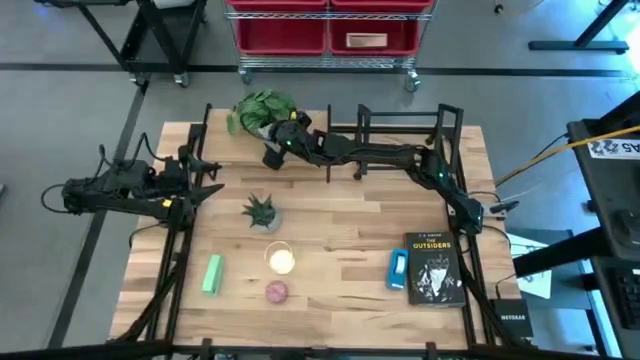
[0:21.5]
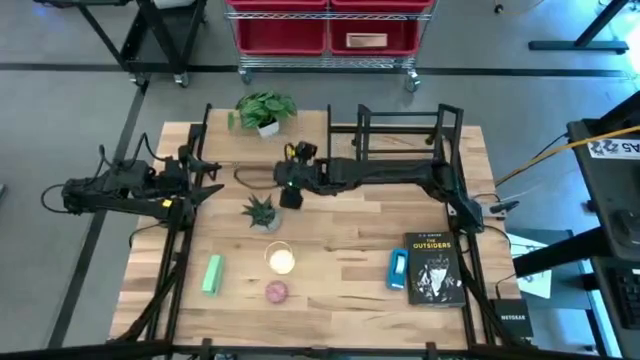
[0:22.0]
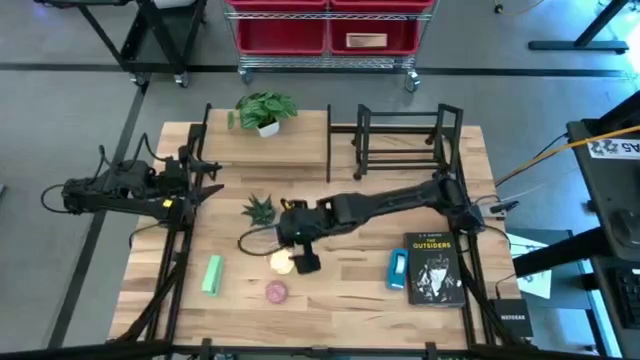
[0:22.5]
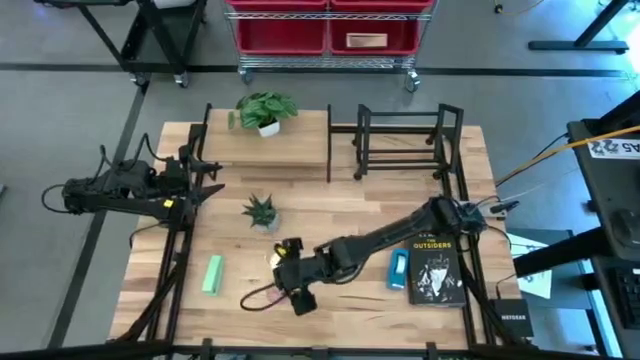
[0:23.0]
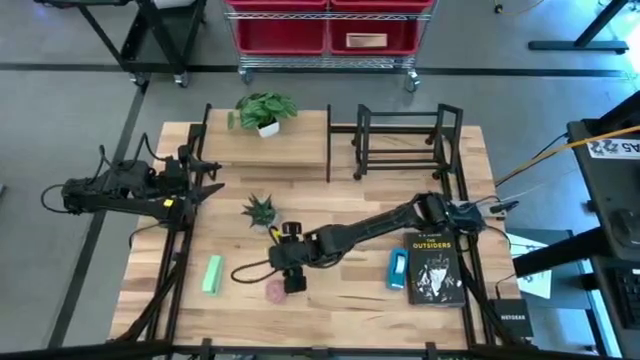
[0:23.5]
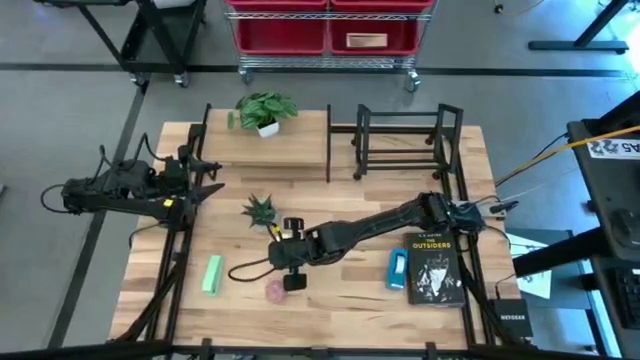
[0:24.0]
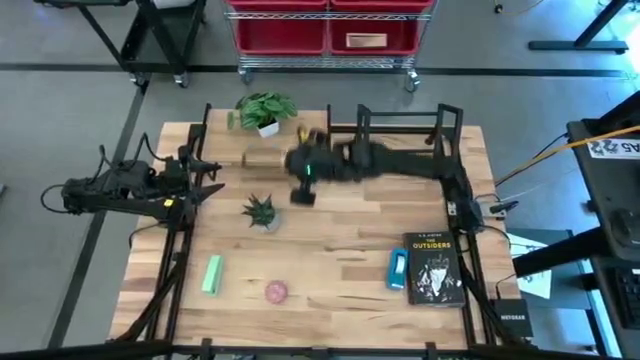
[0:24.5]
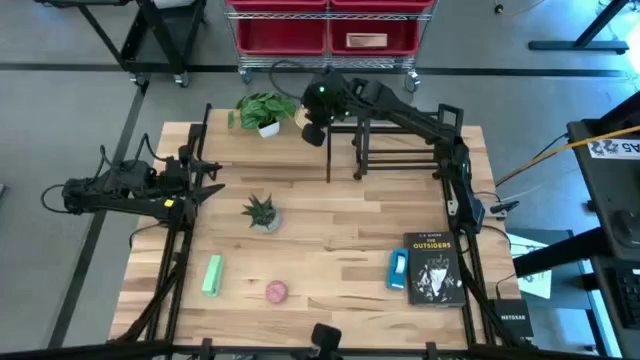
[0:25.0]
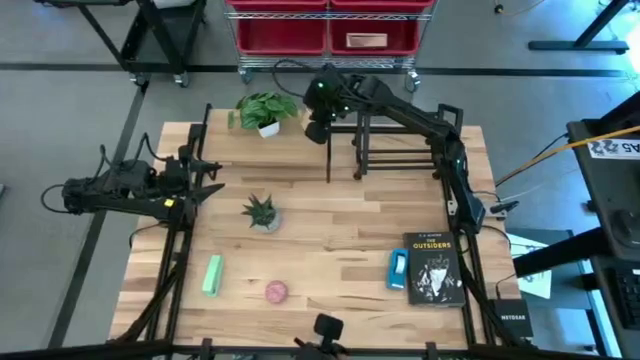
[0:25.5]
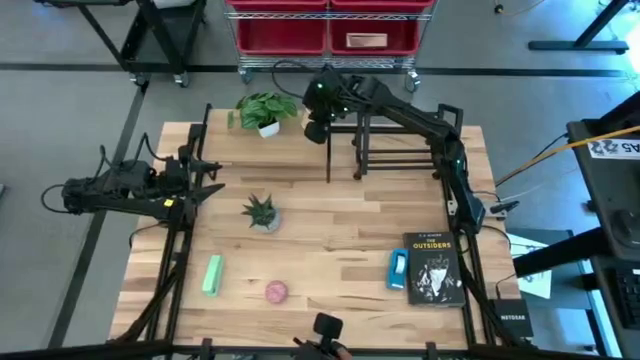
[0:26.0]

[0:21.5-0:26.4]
Task: Stock shelves
Put the gold pen holder on the shelf

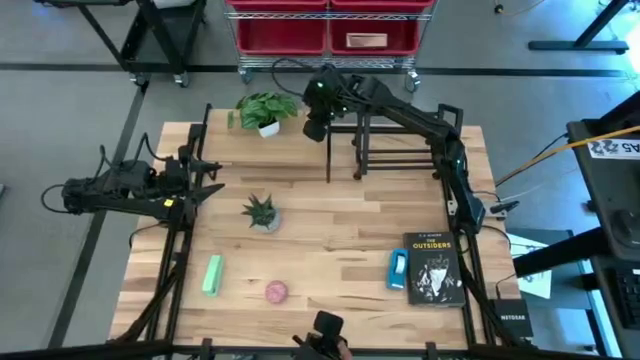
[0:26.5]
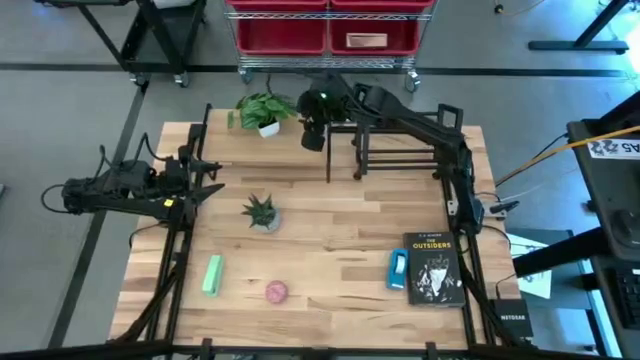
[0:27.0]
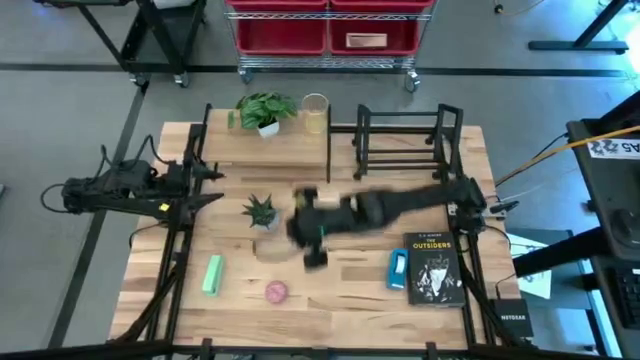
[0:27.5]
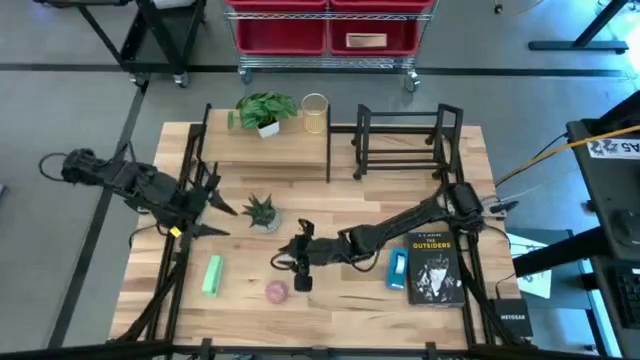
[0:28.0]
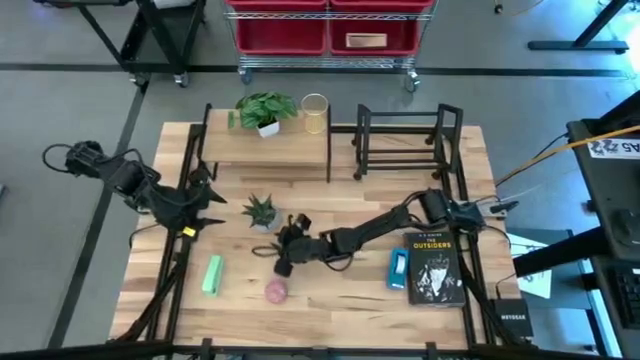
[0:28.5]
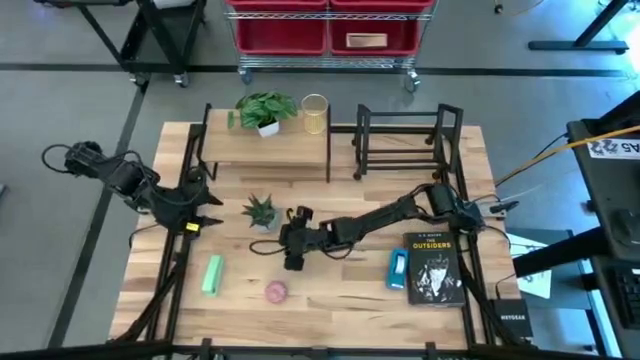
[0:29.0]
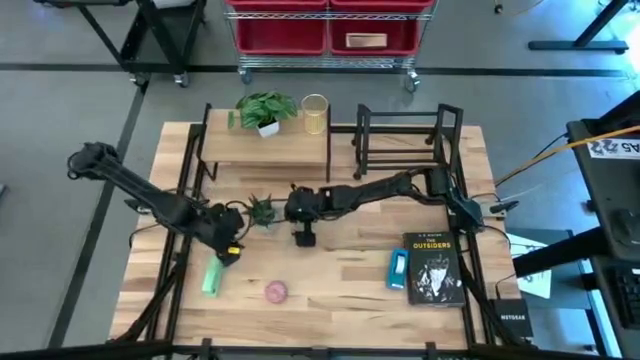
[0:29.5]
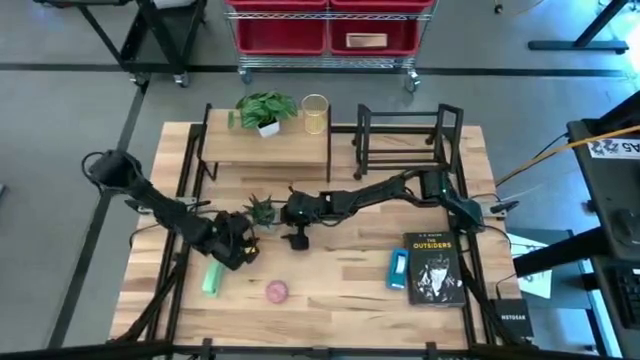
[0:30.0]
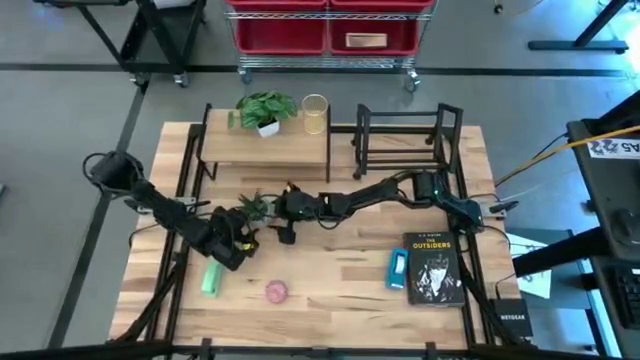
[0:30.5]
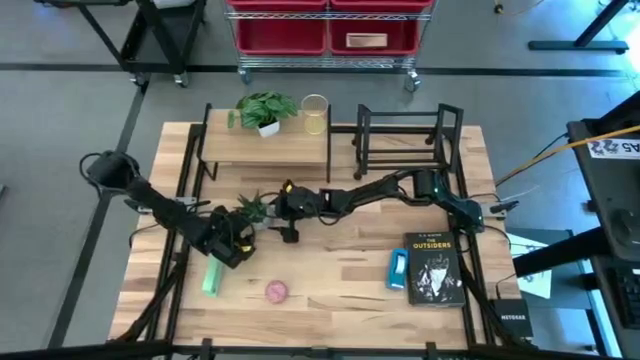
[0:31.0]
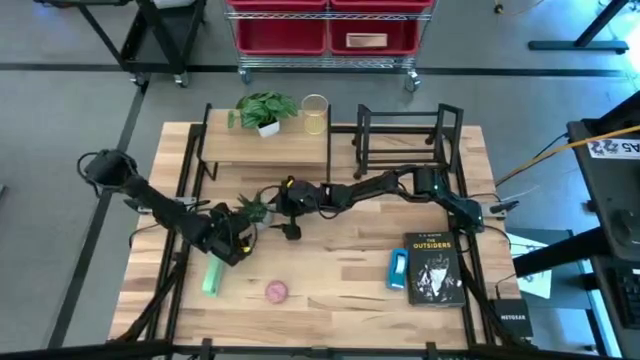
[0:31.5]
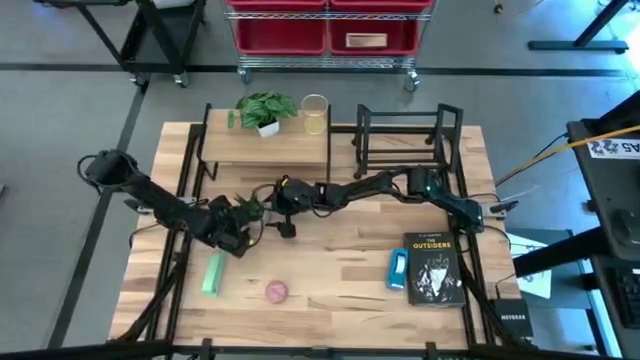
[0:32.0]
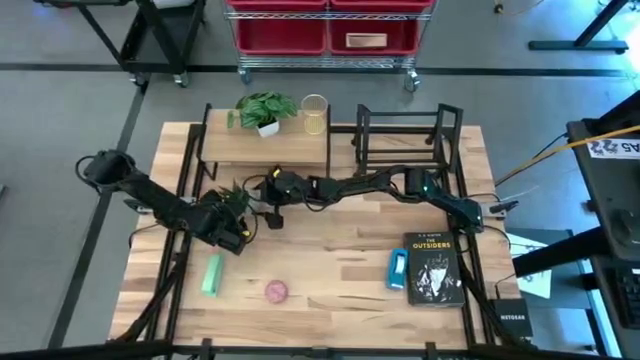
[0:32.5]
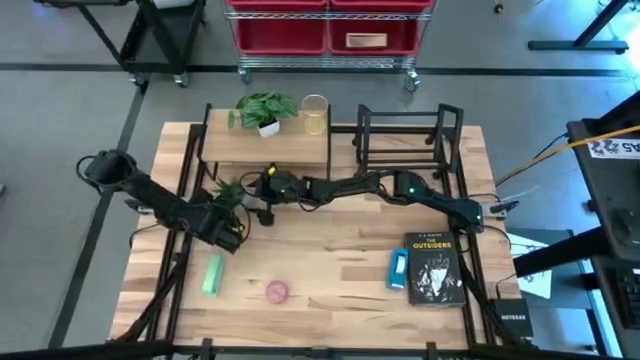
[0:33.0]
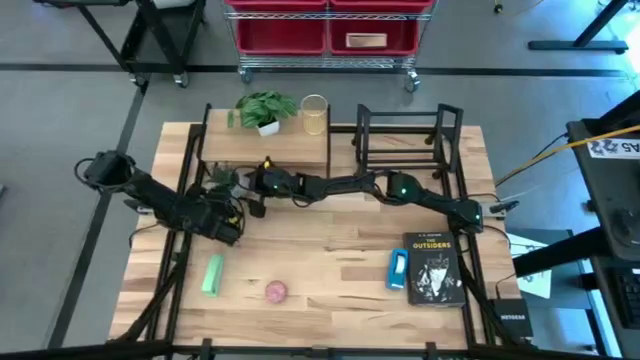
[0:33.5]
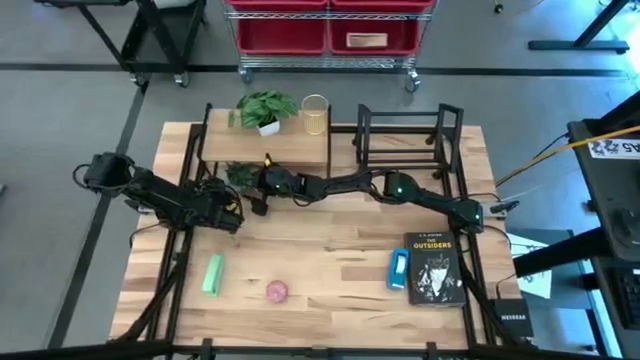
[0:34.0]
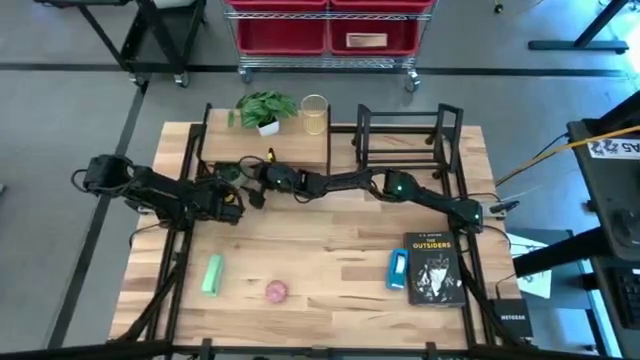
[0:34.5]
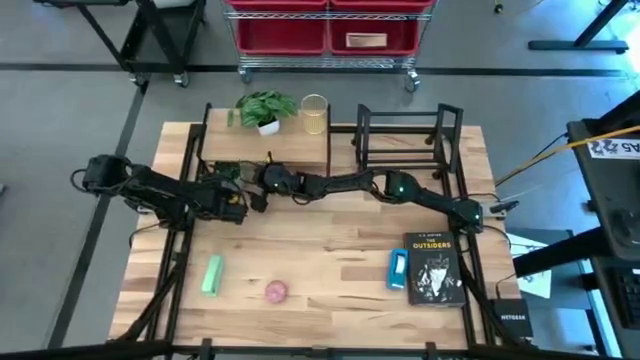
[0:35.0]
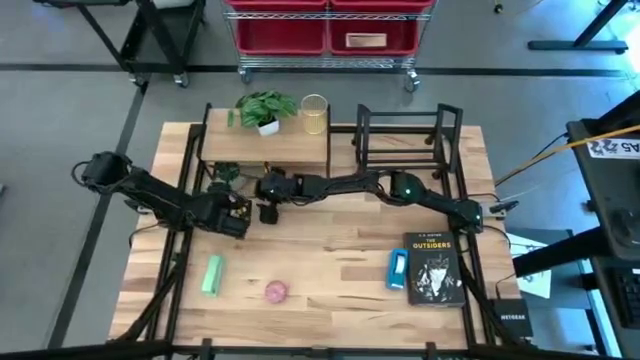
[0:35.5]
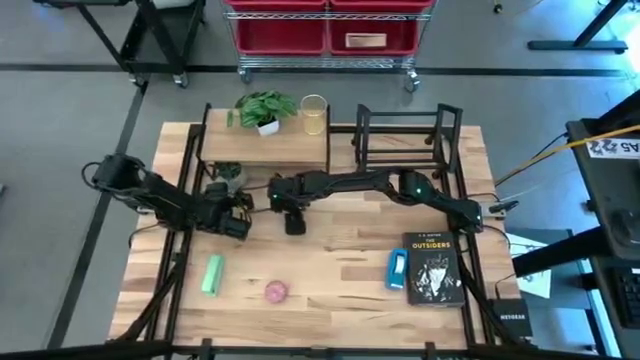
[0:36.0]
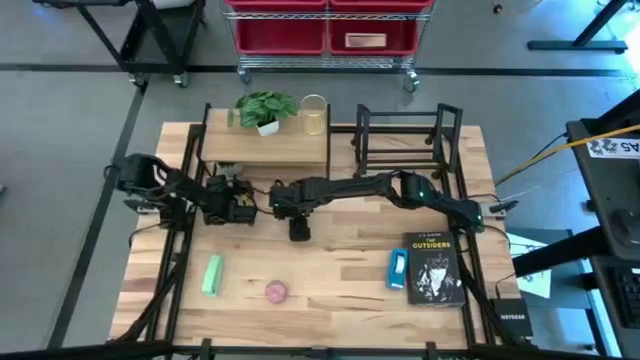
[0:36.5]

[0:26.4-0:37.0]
Put the gray plotted plant under the shelf

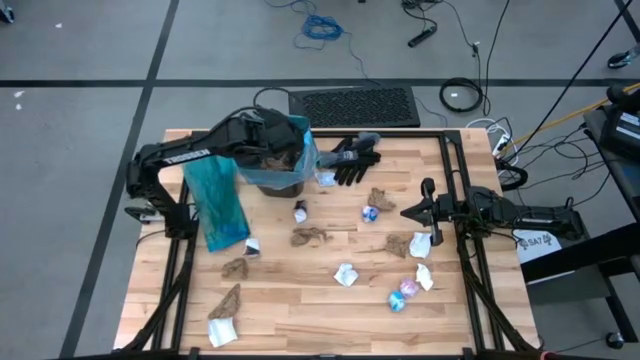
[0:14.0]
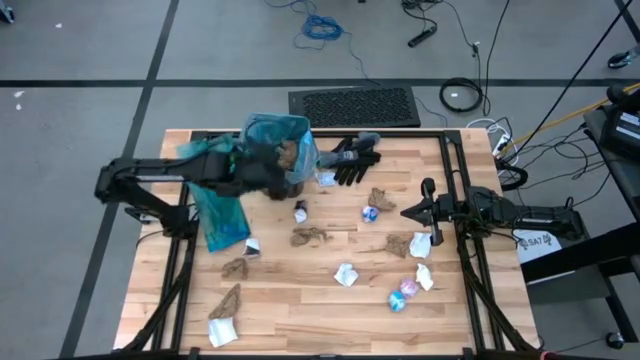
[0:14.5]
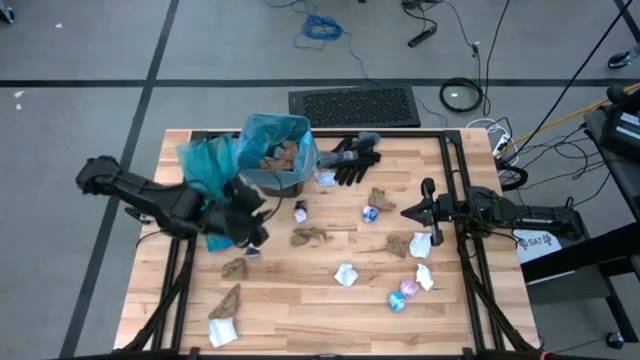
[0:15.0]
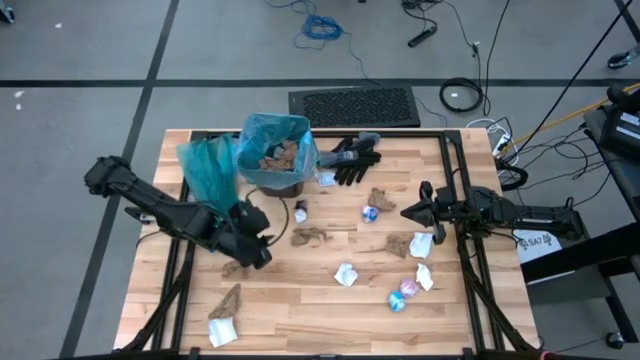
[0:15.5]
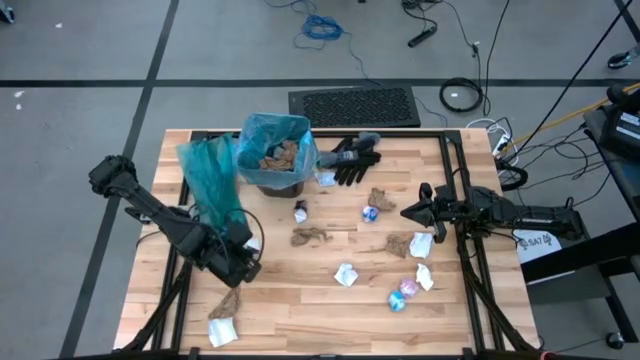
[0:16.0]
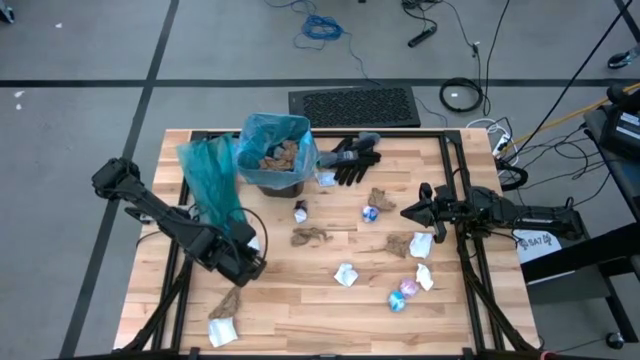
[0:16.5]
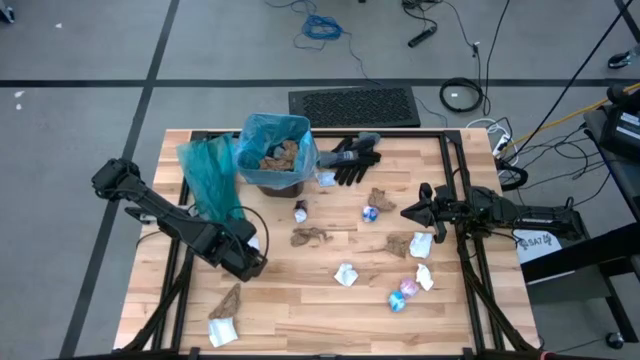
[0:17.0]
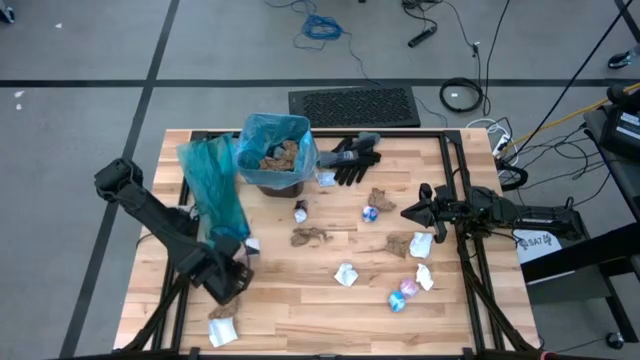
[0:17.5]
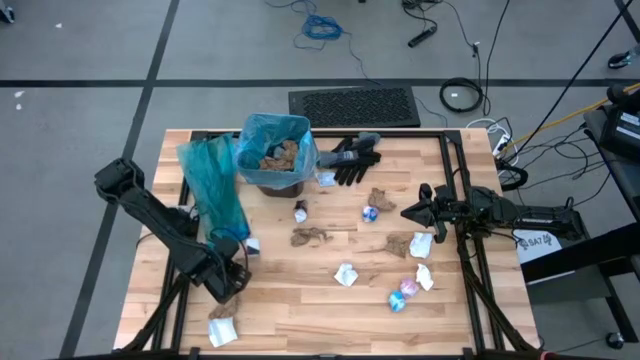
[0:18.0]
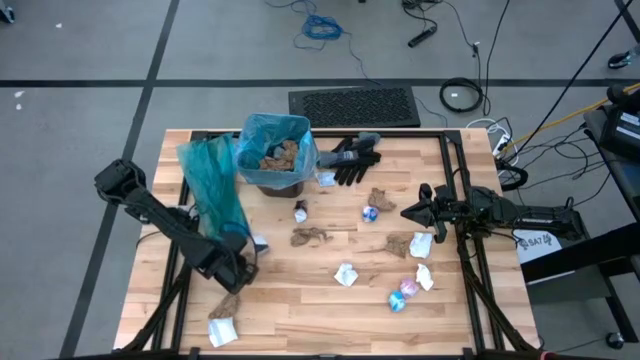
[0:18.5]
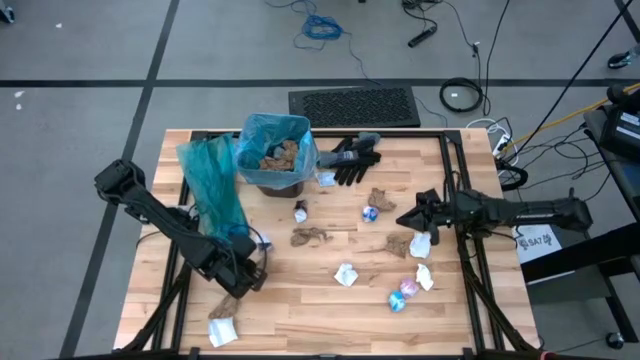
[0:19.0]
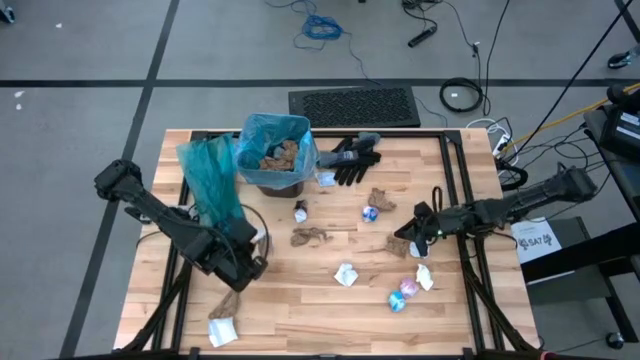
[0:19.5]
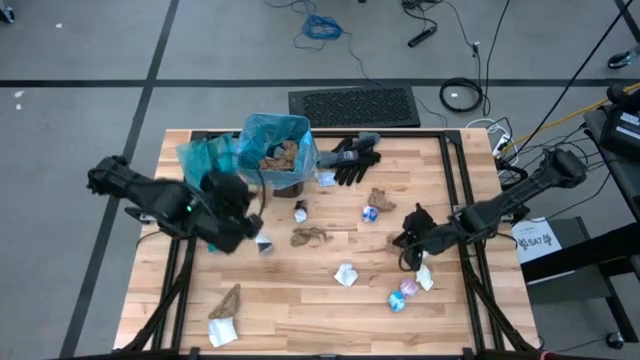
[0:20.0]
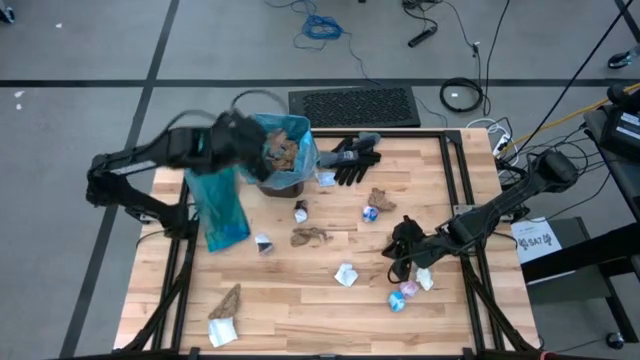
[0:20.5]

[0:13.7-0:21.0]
Task: place trash/remove bag and relplace
Put the brown napkin into the trash bin
